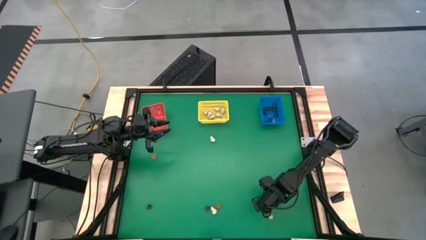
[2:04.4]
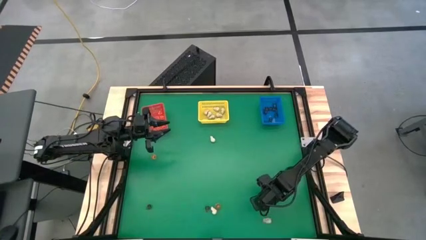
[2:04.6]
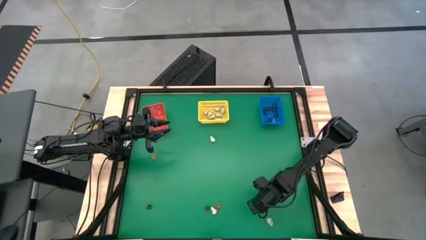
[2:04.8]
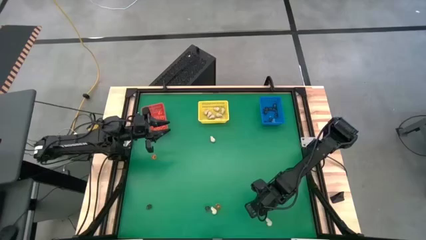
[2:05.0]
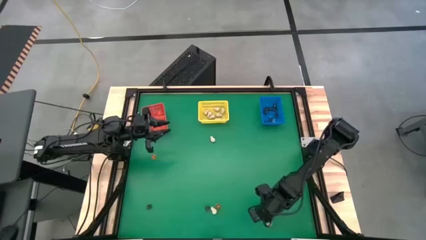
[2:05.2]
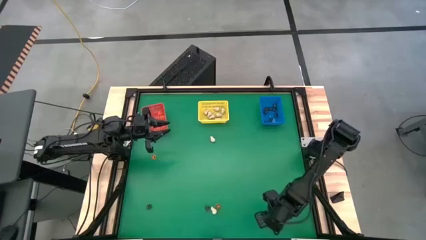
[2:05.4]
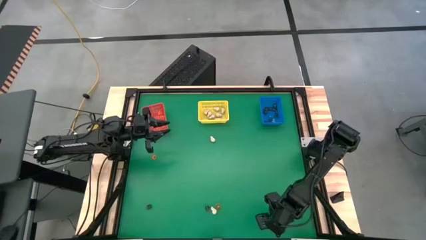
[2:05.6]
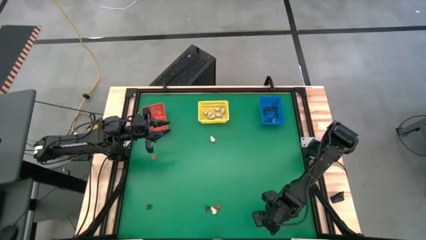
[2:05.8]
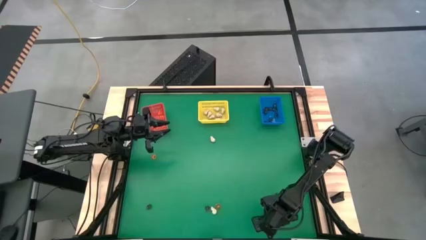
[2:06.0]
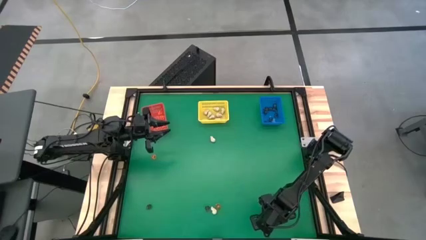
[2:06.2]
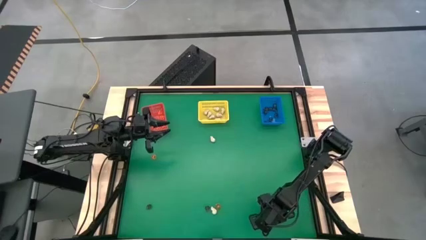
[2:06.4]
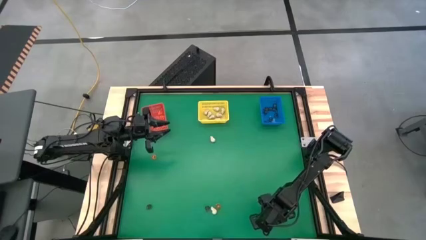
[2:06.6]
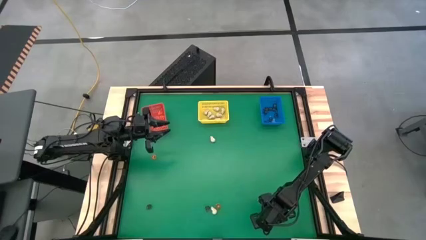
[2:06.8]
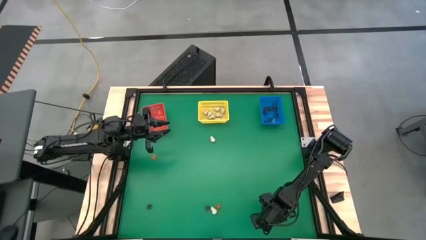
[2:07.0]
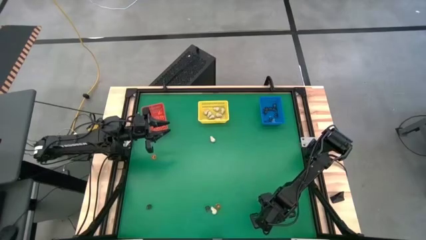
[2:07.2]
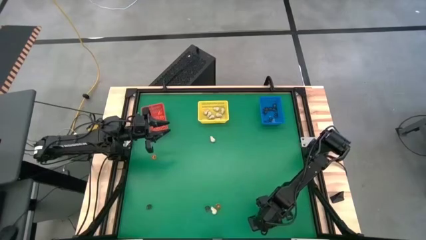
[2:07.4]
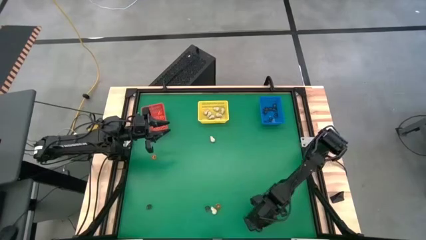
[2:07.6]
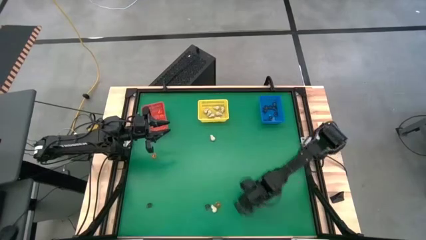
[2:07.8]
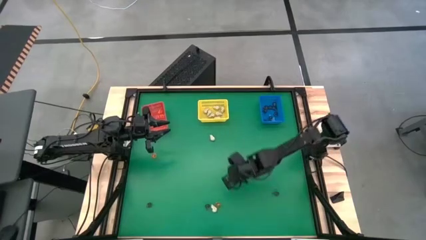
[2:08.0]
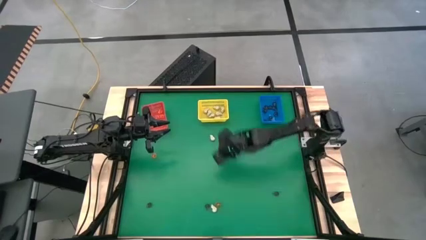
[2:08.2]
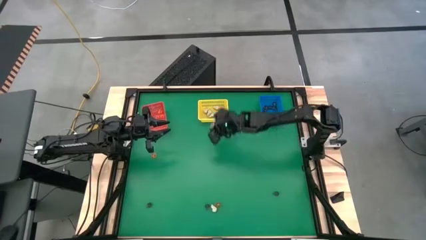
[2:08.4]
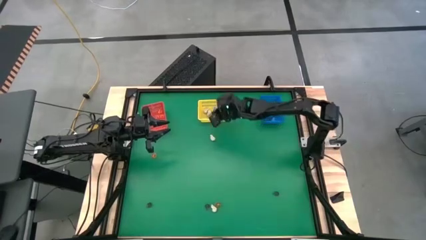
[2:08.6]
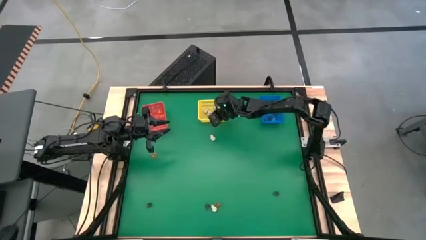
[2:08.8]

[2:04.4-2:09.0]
Task: Sort Halloween decoration
Put the white skull toy into the yellow bin

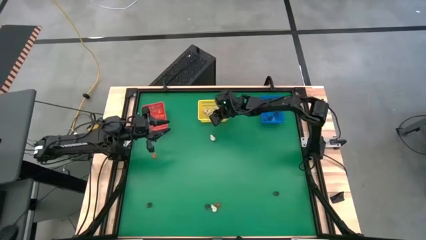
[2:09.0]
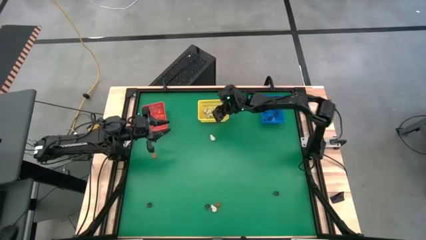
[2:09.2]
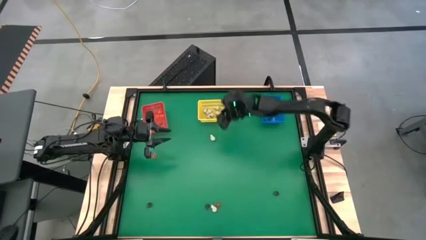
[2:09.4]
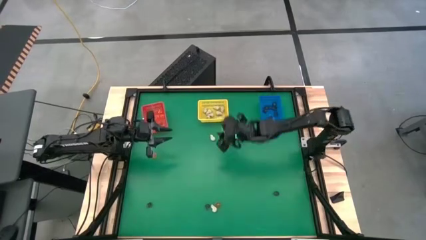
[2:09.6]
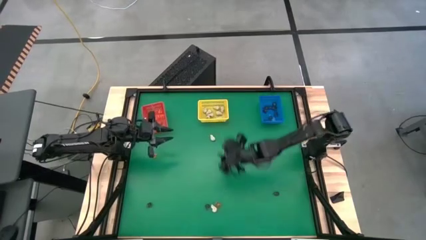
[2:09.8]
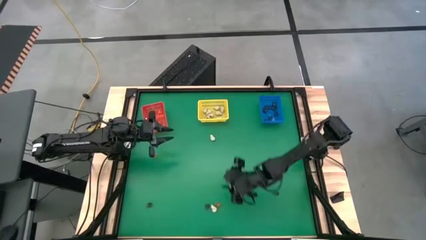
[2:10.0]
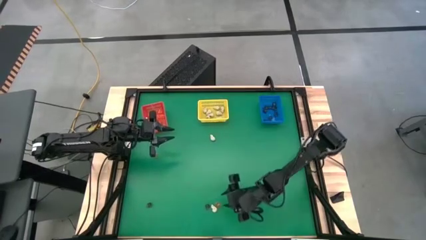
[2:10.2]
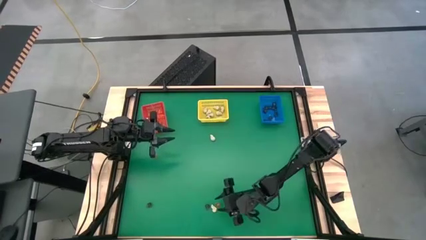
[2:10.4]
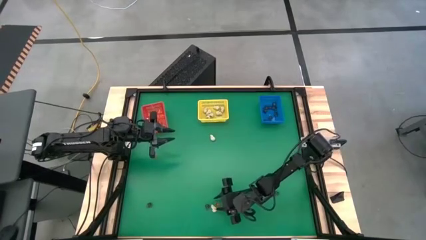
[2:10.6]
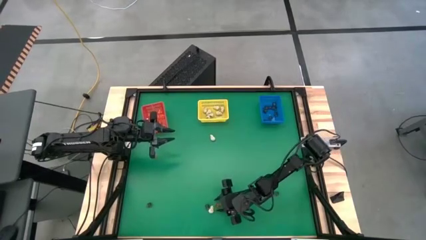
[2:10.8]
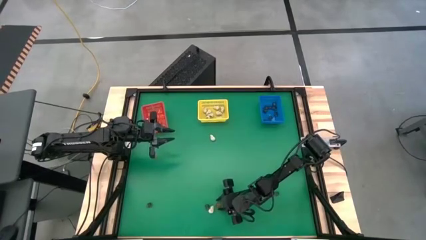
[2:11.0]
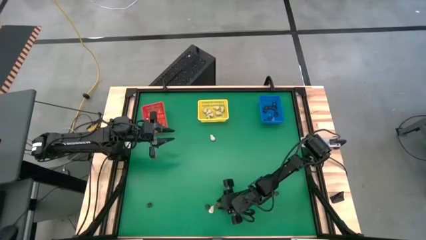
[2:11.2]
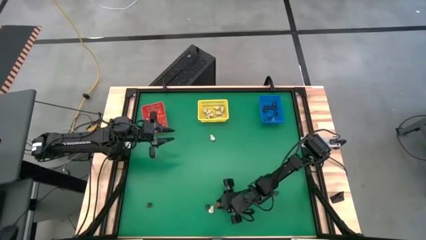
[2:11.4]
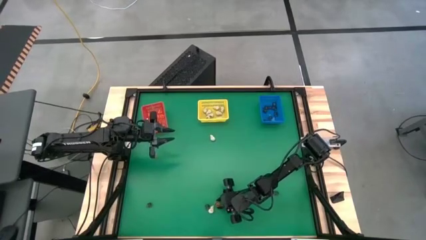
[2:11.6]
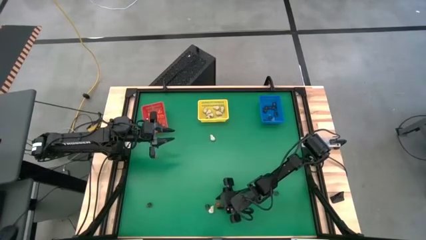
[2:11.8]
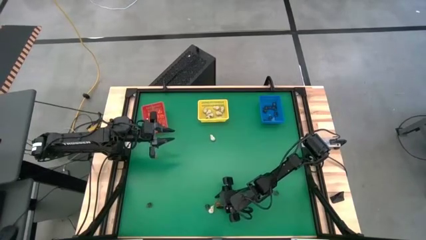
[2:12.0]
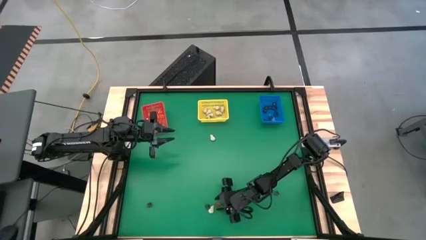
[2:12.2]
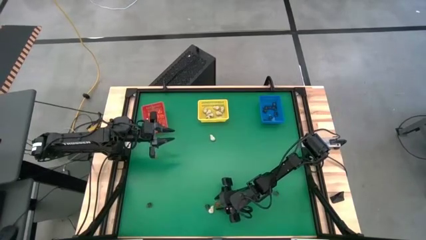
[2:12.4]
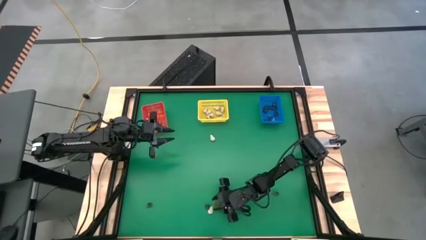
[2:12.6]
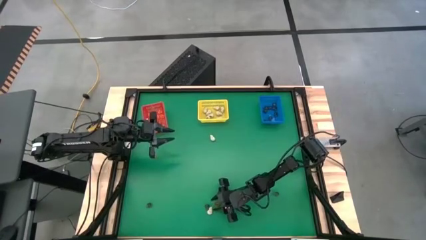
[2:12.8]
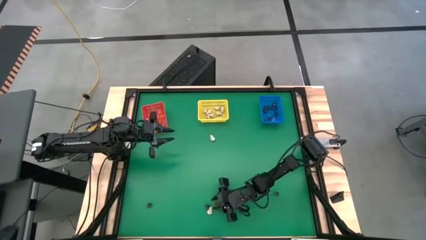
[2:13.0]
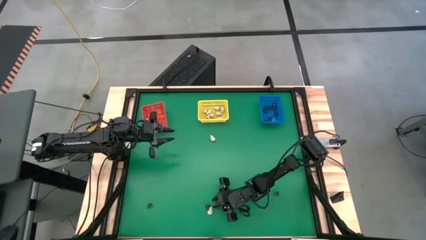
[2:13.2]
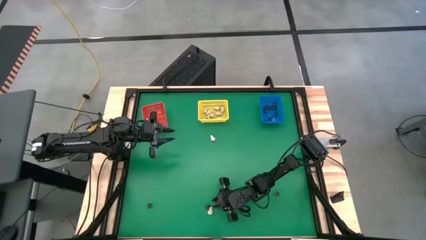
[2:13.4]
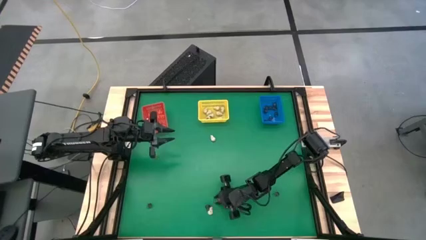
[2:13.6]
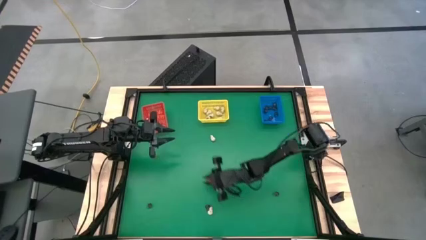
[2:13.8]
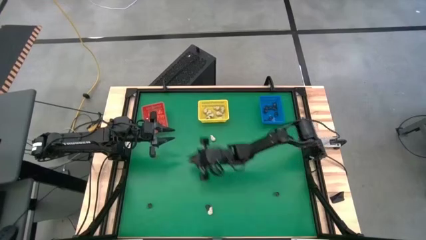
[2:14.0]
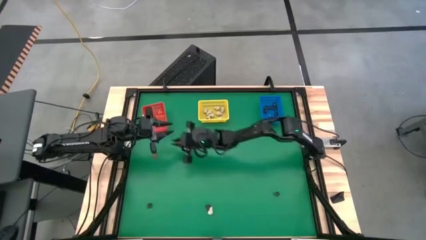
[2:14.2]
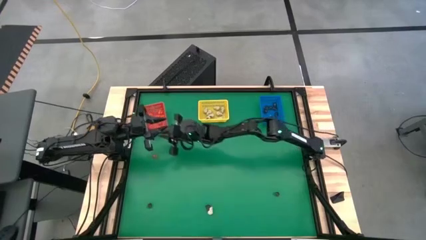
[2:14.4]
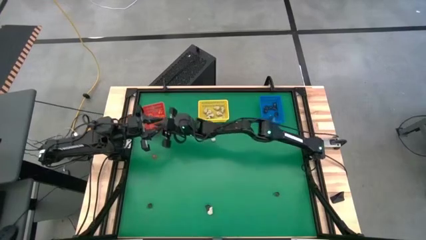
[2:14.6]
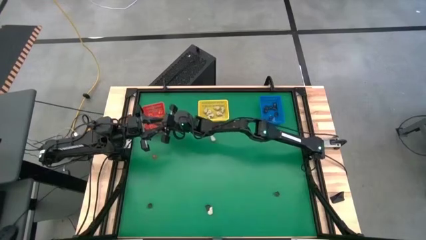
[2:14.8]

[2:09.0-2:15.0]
Put the orange flower toy into the red bin

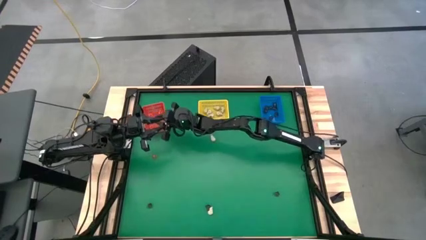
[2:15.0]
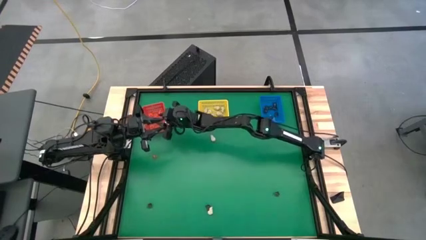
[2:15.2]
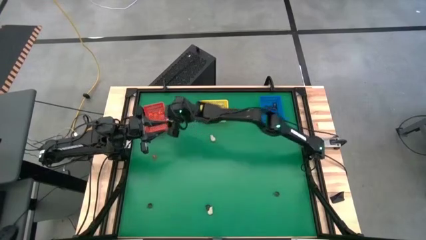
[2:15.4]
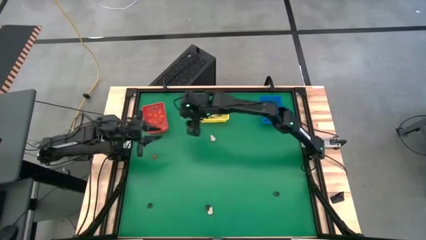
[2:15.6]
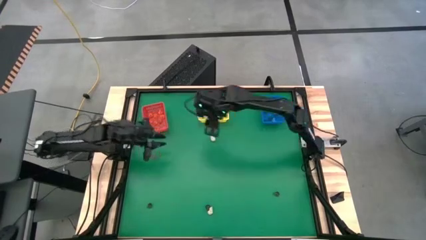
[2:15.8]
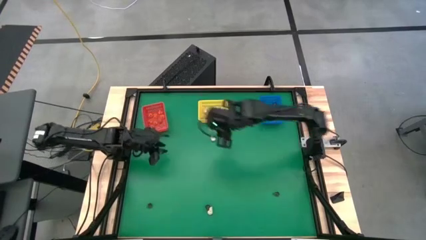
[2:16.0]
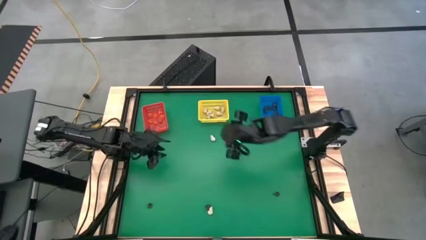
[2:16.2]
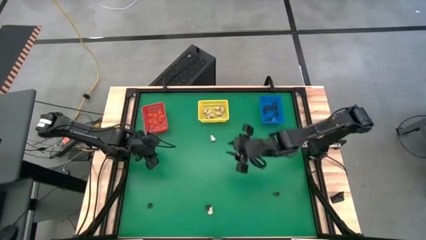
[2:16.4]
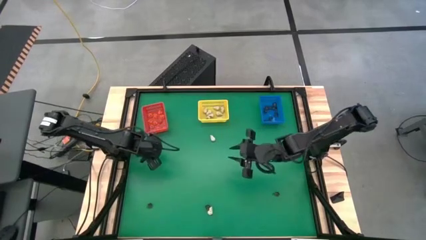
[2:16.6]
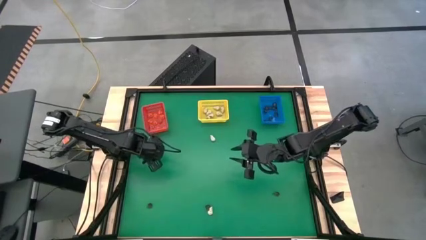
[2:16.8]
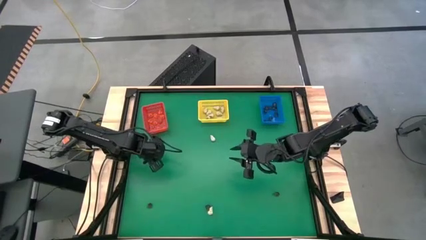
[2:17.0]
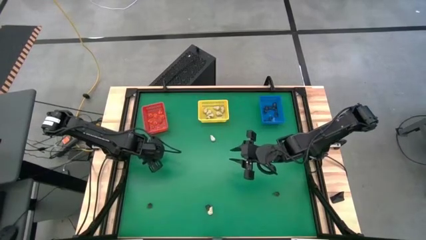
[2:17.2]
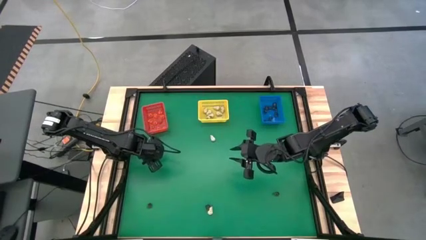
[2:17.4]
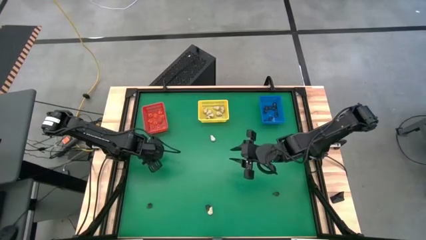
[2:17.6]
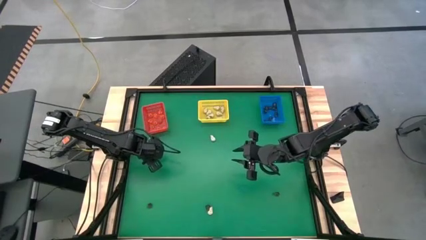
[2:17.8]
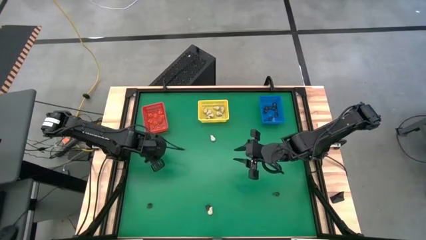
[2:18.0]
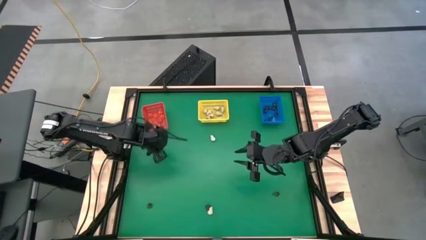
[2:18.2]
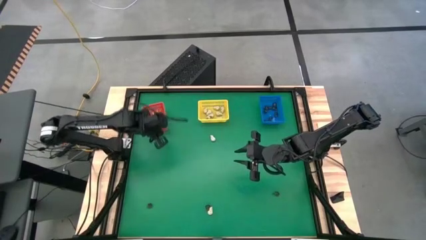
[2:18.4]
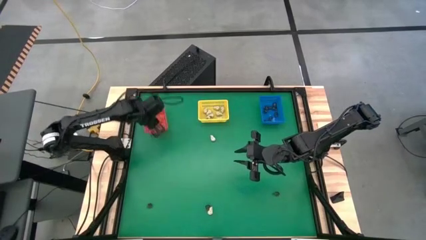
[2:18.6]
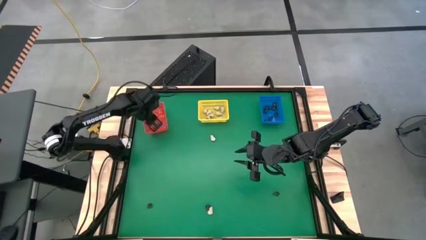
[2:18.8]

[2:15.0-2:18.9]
Put the orange flower toy into the red bin

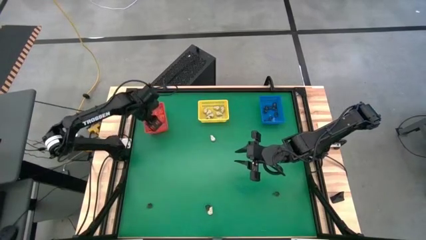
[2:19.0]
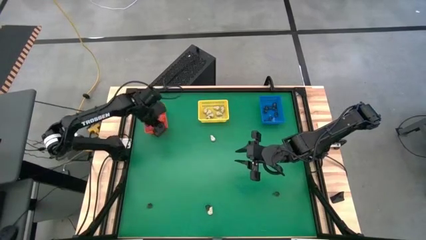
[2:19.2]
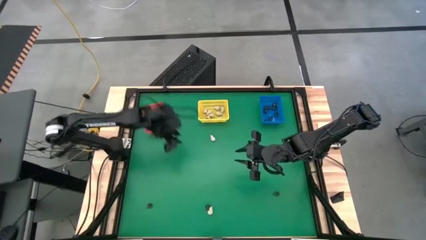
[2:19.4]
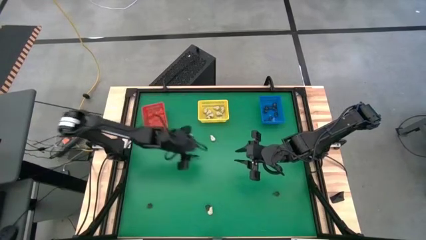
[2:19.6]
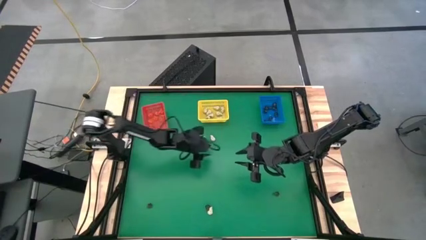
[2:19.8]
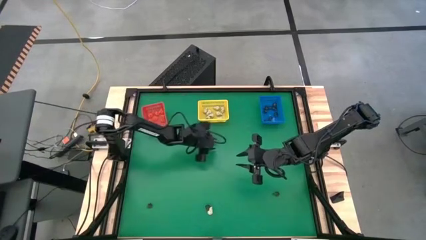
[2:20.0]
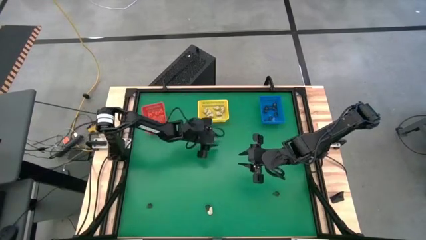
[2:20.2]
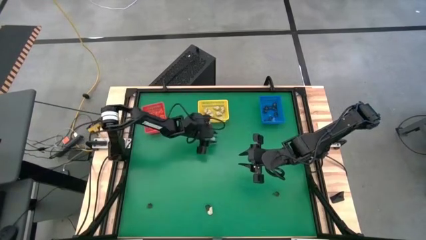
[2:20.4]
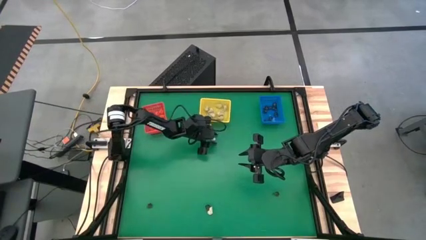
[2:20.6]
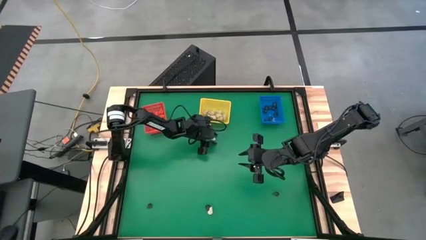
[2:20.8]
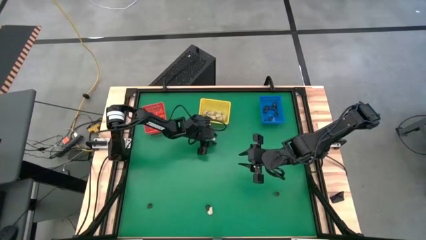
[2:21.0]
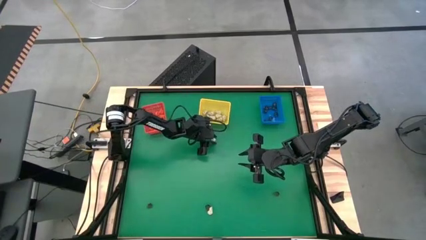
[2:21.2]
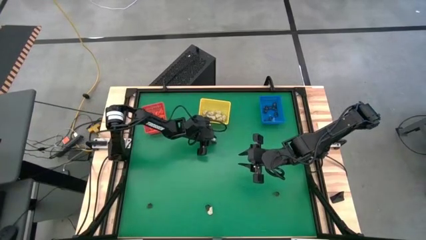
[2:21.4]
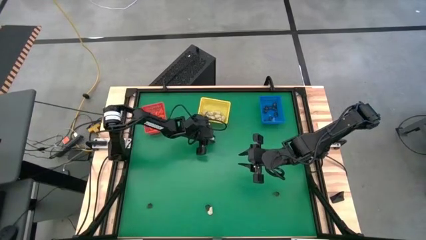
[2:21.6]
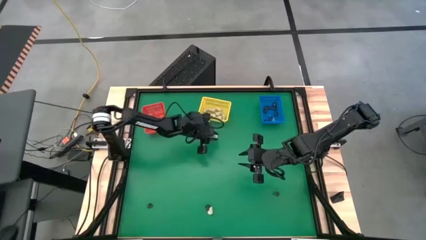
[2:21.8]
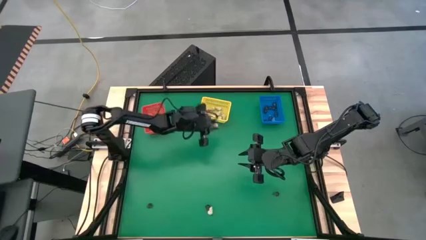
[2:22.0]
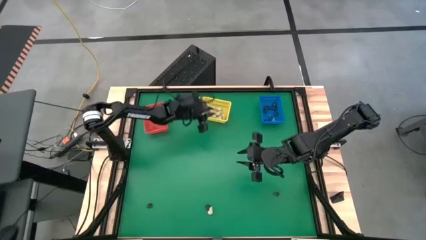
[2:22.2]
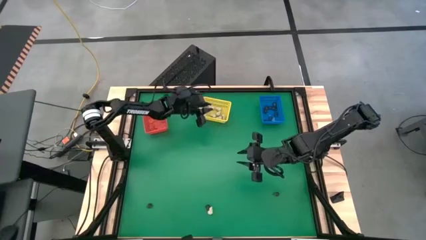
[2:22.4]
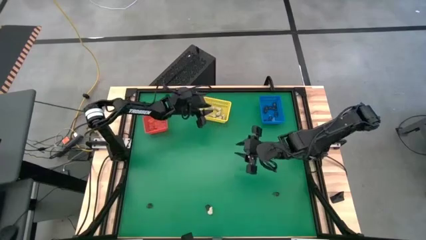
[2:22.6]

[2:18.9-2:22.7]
Put the white skull toy into the yellow bin

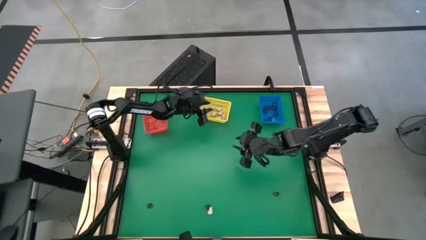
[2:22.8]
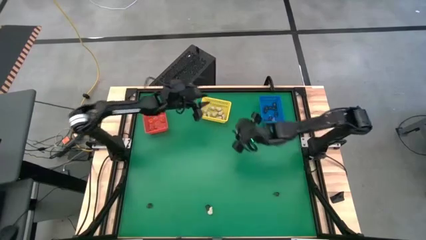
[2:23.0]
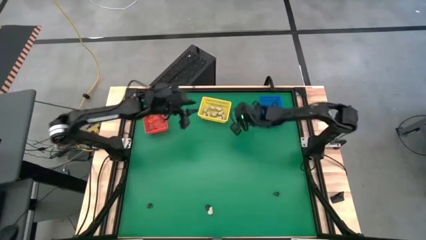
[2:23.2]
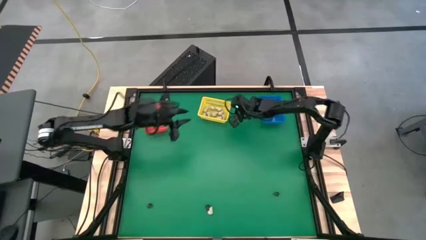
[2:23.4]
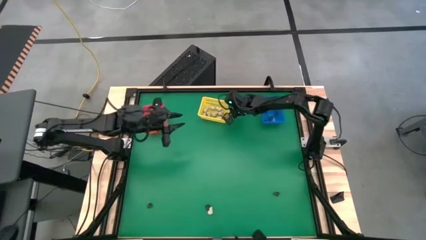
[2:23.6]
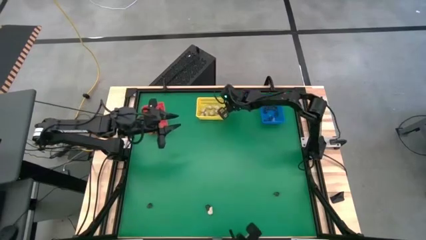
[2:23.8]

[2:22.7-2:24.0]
Adjust the yellow bin
